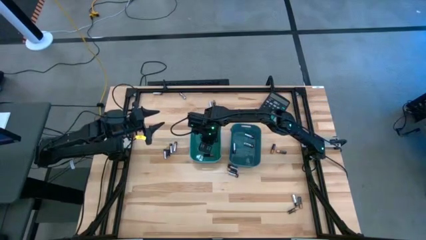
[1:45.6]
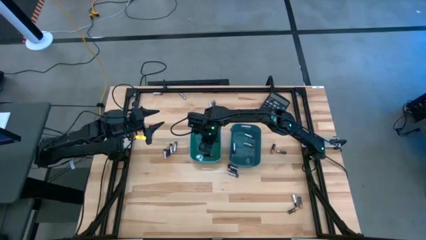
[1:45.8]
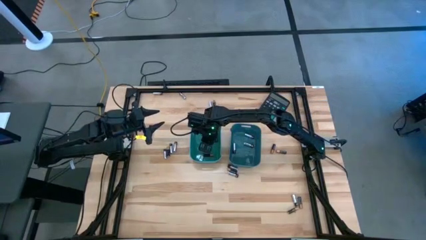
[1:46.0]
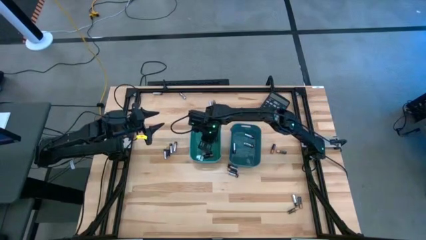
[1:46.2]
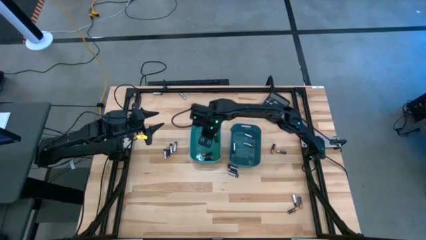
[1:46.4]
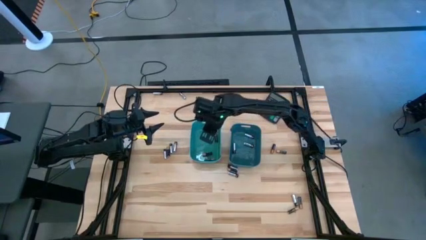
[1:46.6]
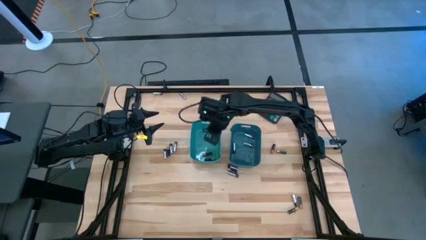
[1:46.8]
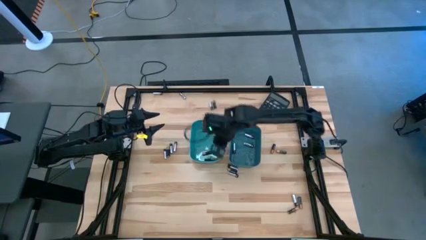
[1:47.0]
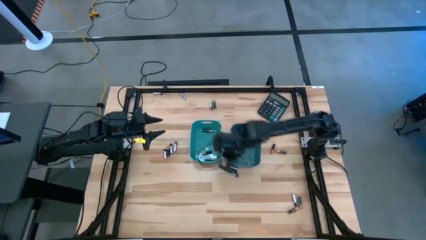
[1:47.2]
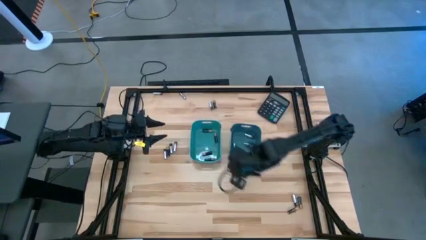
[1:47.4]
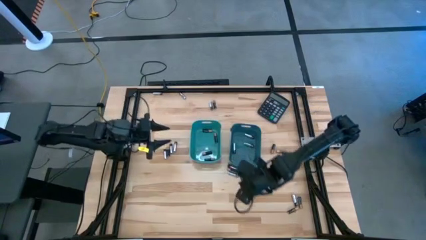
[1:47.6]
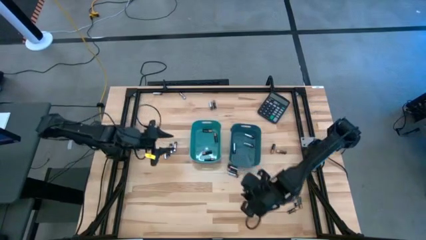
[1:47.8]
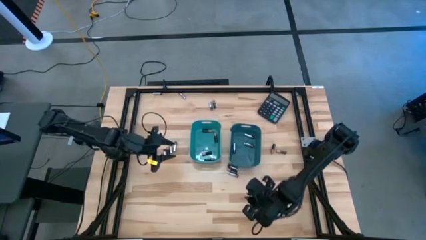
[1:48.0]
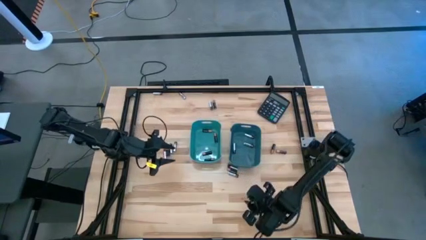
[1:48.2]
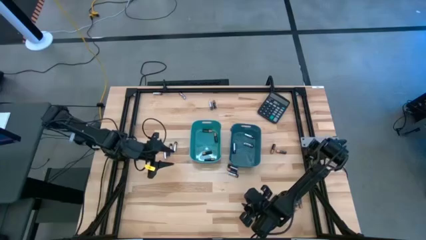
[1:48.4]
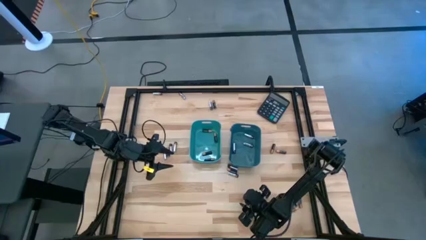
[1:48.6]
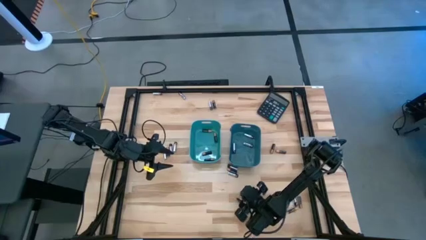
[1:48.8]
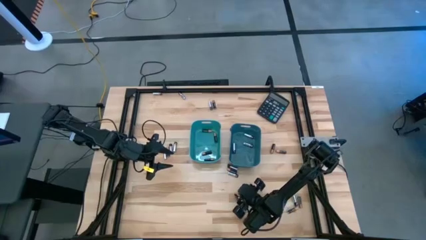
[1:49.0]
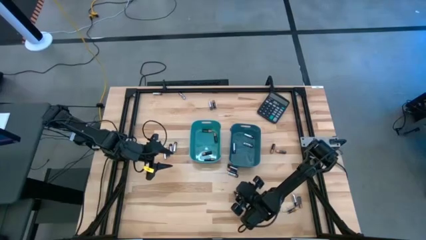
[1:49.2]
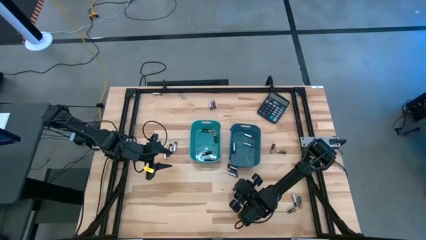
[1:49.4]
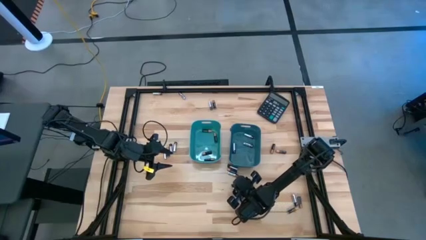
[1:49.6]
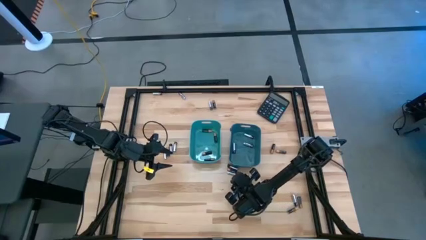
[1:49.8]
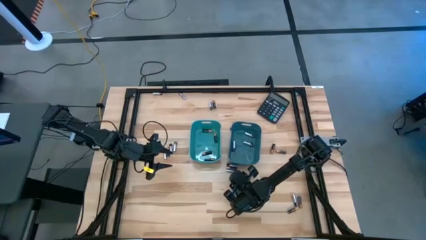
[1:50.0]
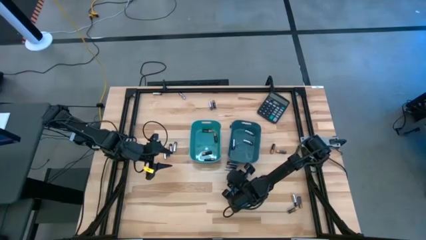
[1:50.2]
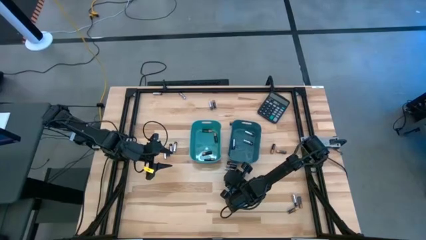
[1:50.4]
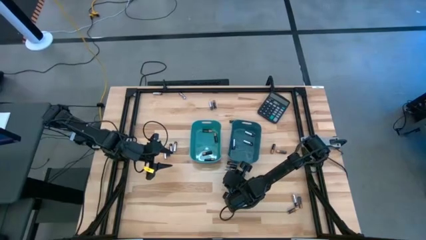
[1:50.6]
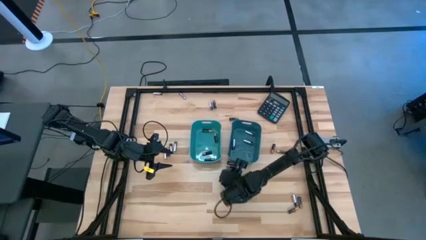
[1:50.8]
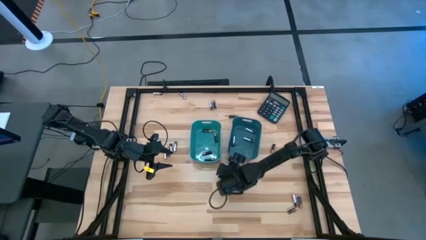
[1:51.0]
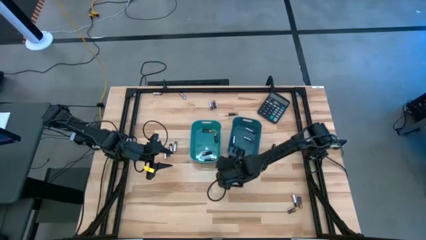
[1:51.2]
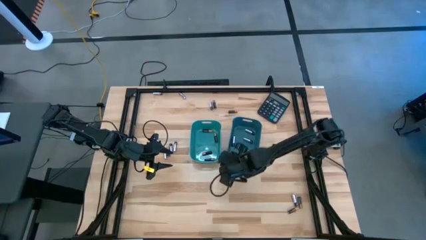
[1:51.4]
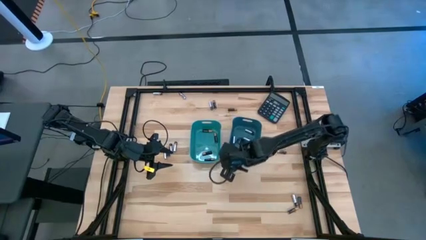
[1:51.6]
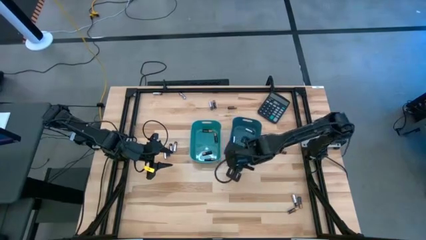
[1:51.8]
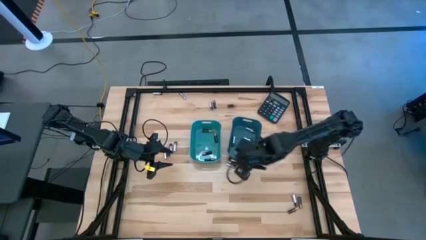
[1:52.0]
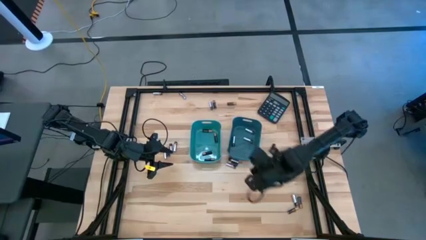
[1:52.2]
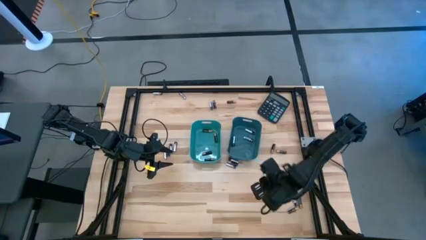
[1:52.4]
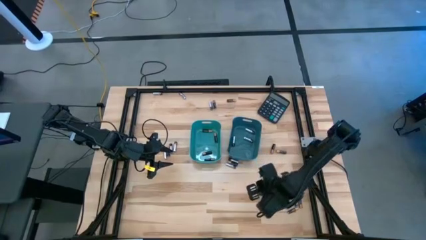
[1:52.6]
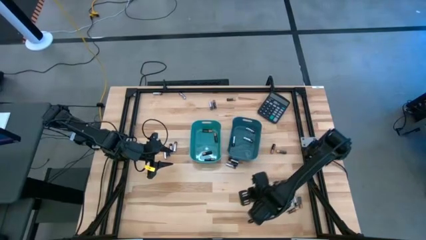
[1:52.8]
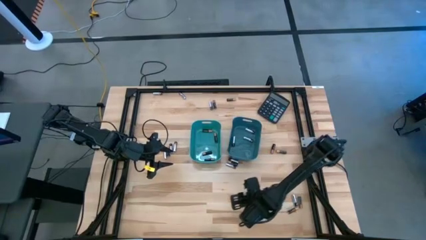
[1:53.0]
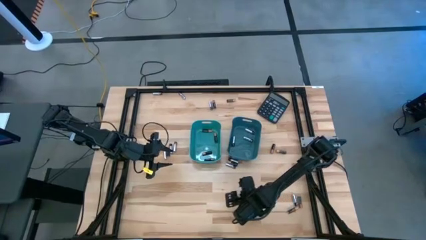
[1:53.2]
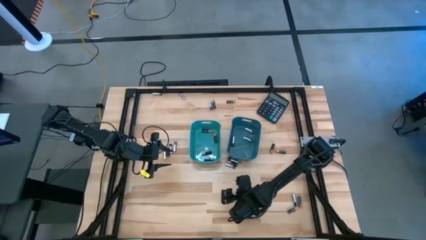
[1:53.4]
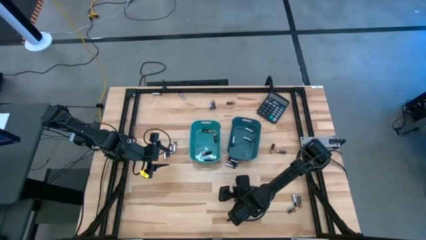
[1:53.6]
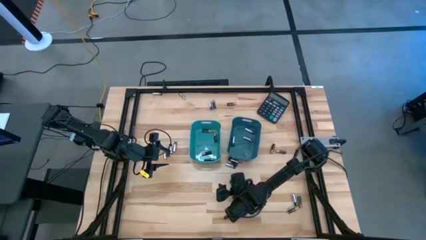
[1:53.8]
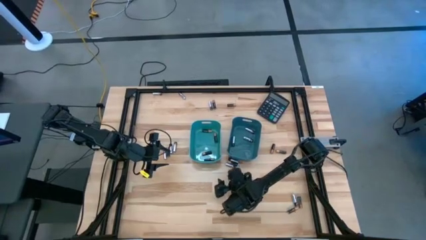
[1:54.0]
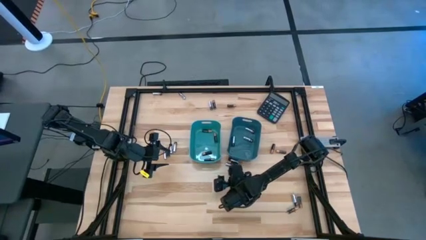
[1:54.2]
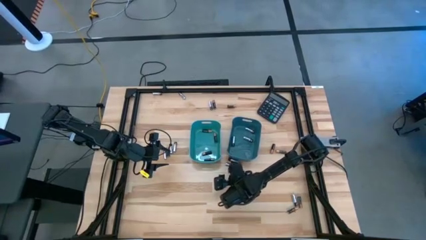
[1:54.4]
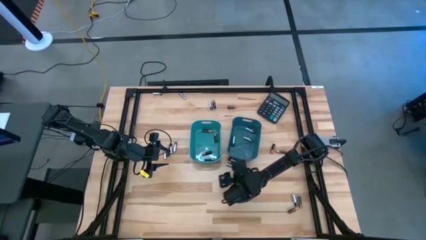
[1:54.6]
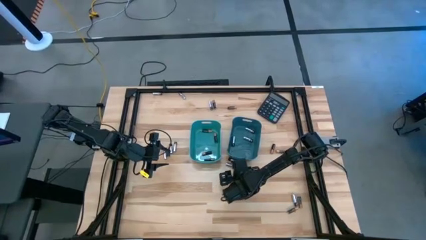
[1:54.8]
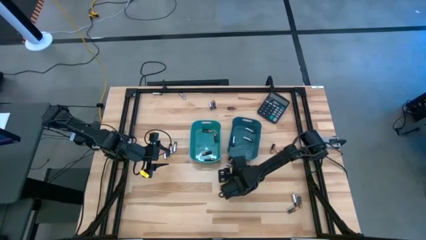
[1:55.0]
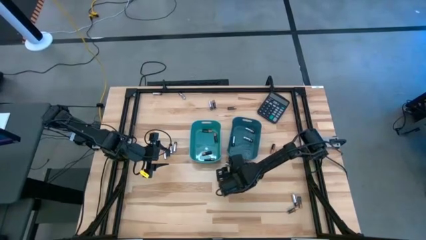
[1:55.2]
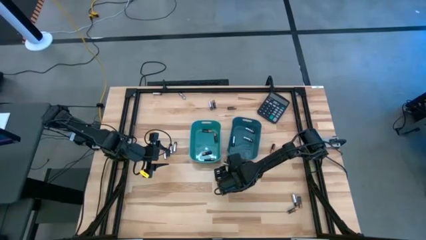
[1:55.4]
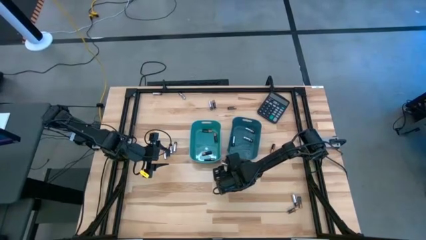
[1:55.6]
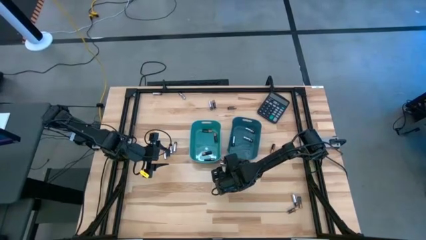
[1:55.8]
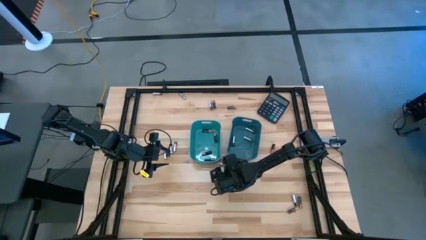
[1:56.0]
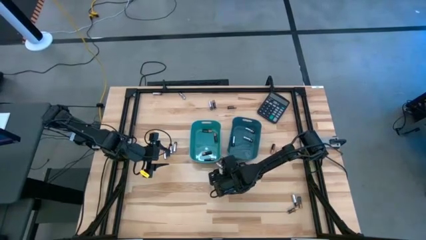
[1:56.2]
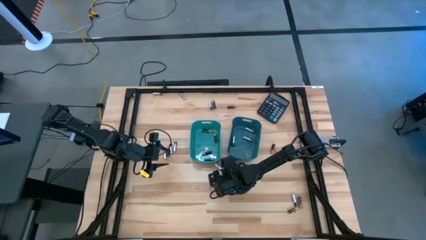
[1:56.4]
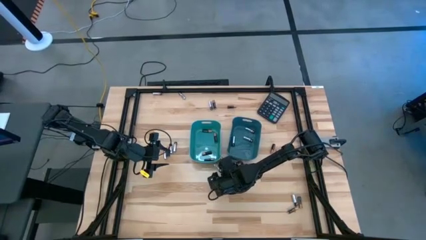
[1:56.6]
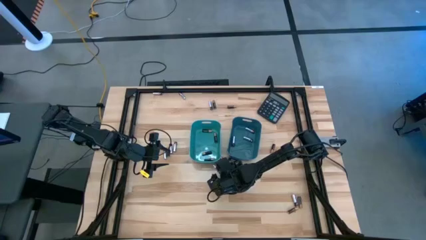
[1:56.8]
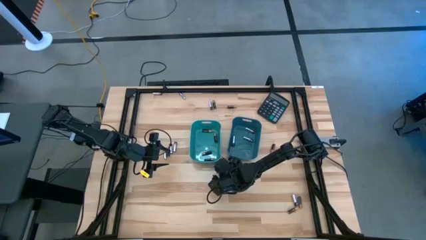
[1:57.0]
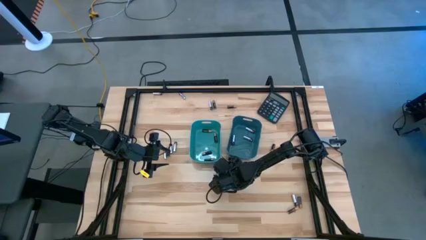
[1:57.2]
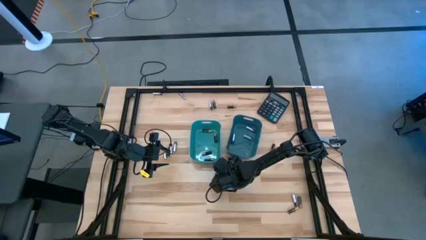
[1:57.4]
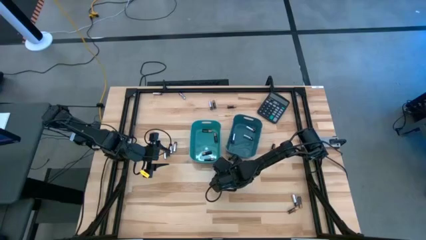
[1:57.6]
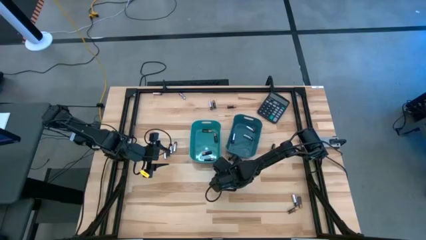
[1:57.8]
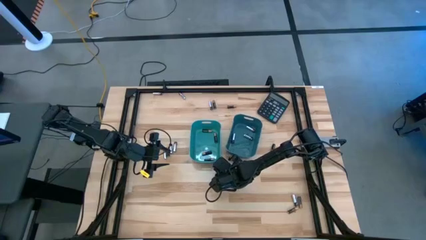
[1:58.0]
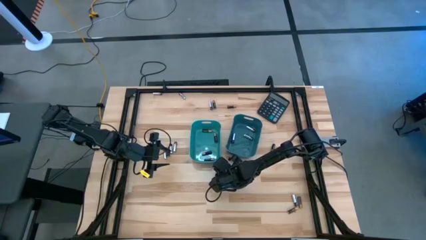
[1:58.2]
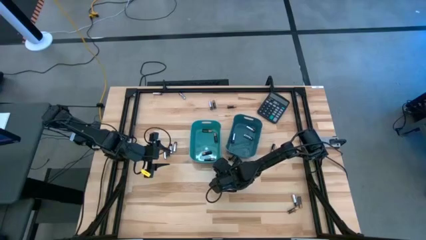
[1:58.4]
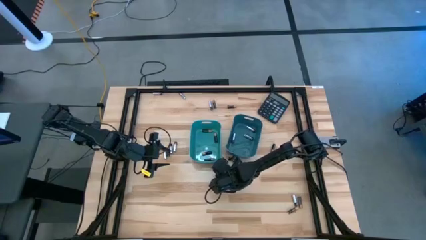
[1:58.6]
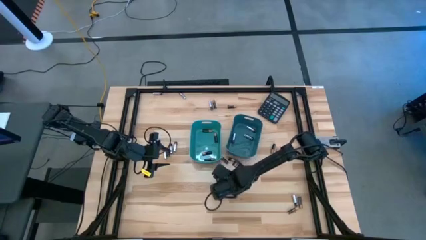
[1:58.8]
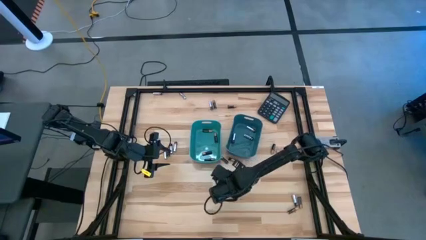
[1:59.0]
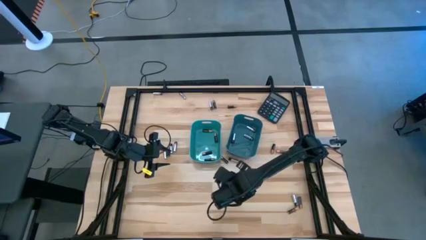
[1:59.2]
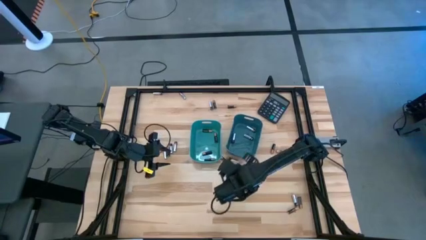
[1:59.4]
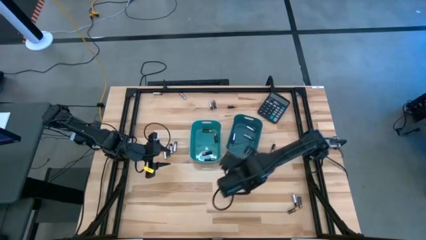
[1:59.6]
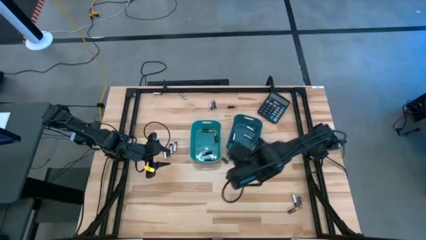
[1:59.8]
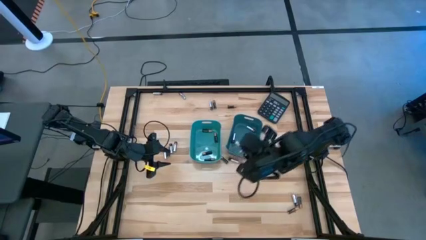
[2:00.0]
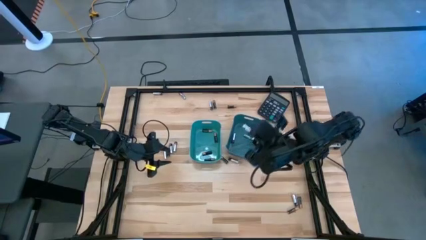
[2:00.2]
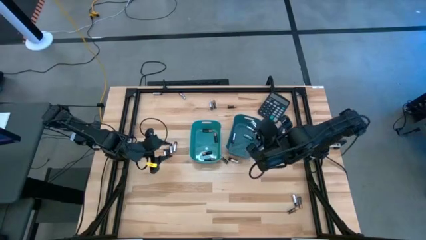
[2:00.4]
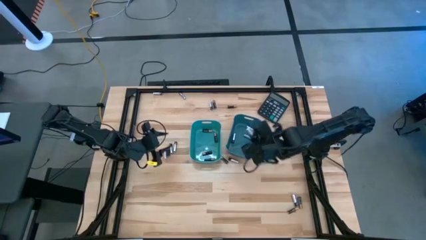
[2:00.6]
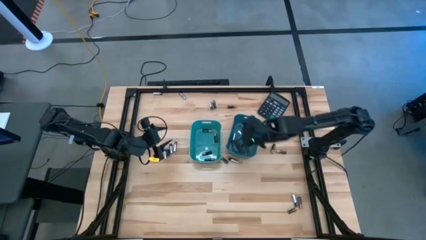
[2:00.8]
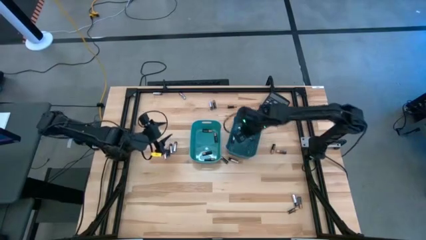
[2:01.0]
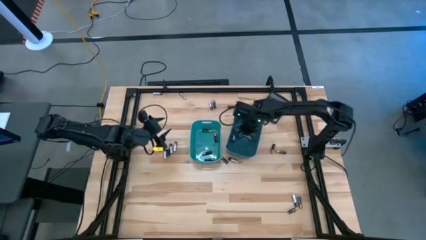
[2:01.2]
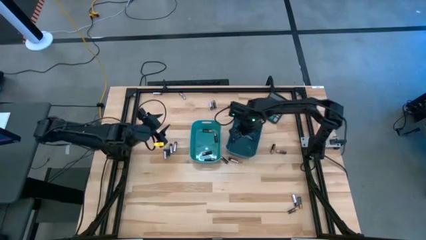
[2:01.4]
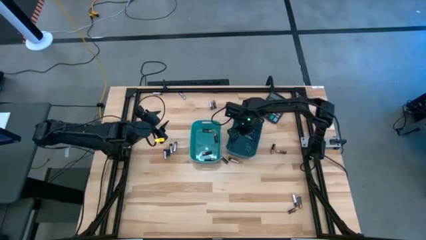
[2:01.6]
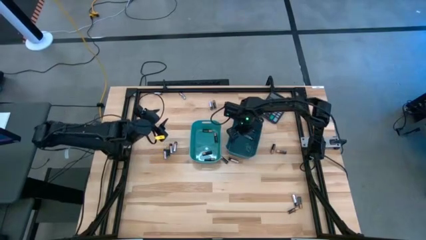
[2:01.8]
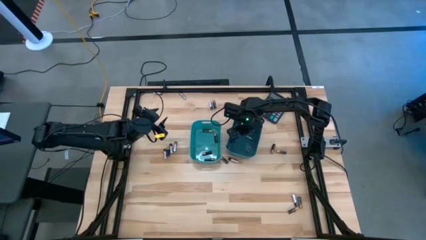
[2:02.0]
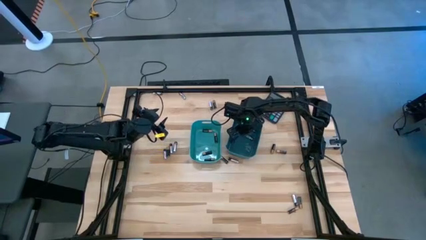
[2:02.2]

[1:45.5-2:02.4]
Task: Sort batteries
Put the silver battery into the blue bin
